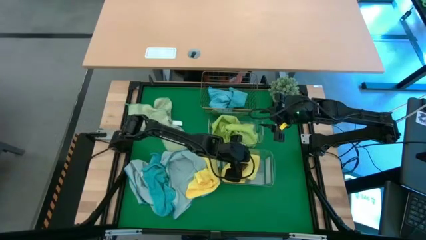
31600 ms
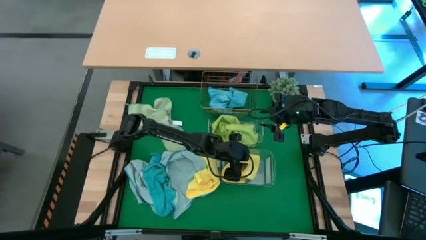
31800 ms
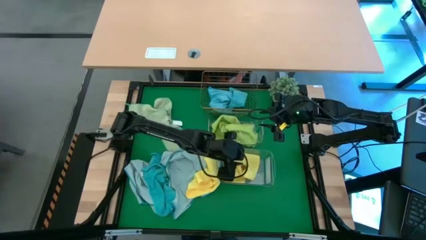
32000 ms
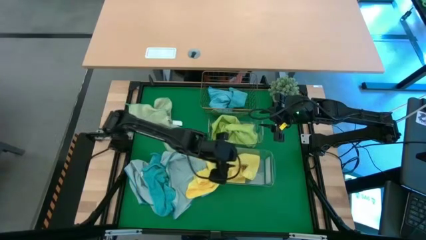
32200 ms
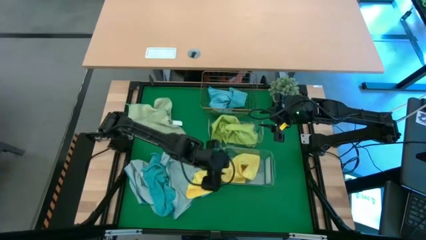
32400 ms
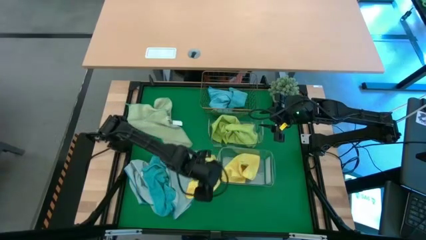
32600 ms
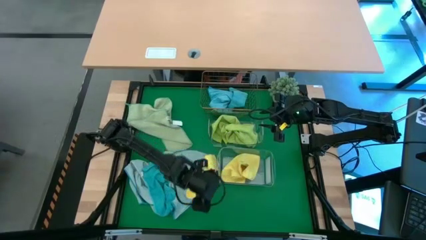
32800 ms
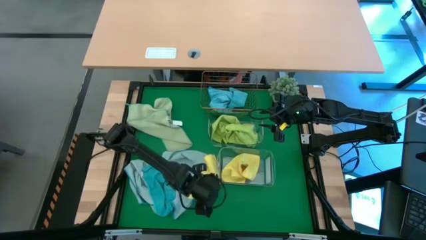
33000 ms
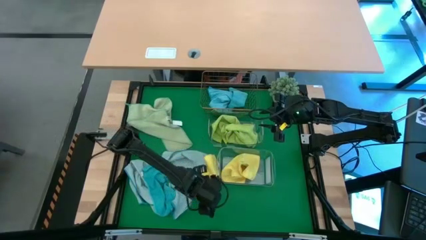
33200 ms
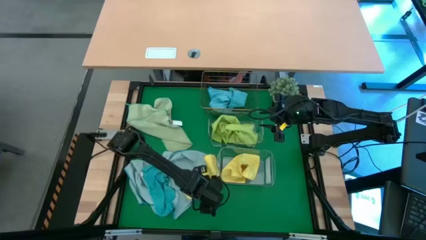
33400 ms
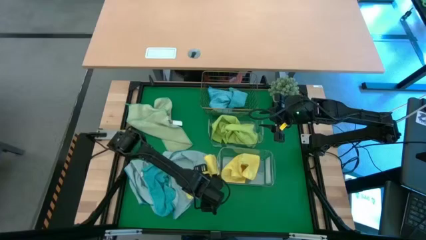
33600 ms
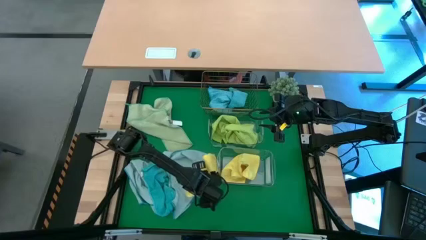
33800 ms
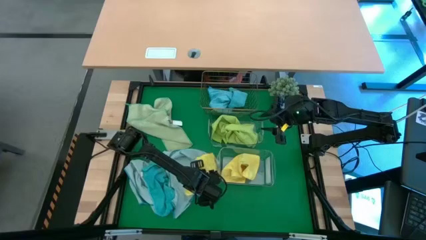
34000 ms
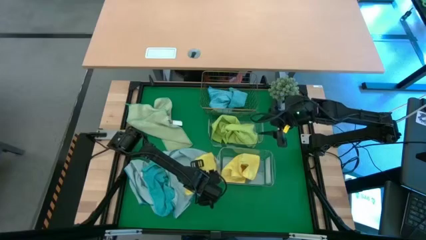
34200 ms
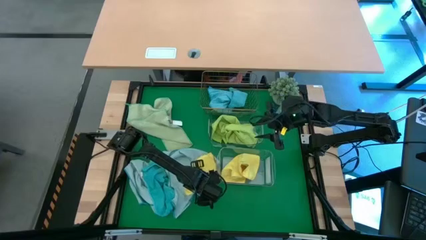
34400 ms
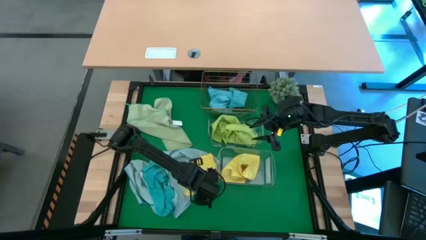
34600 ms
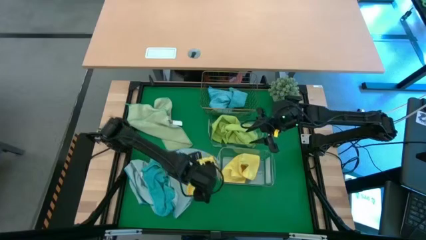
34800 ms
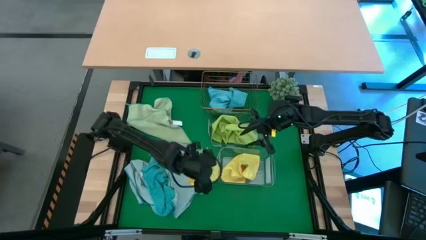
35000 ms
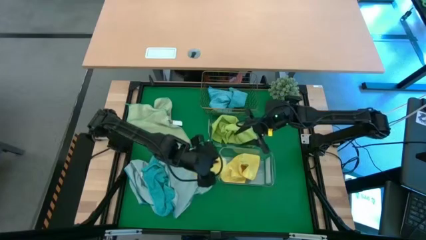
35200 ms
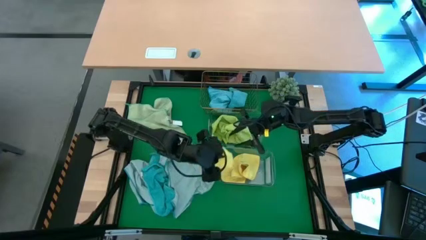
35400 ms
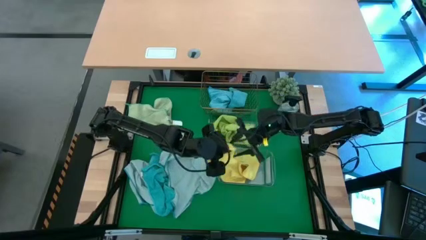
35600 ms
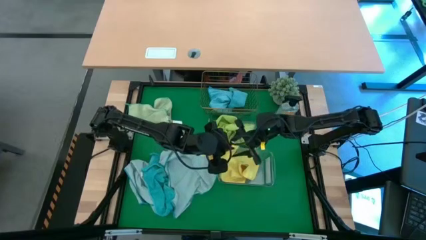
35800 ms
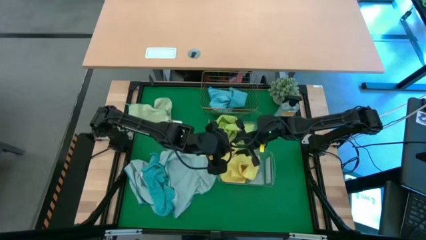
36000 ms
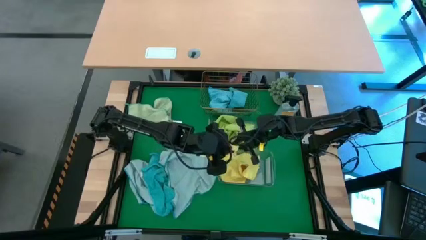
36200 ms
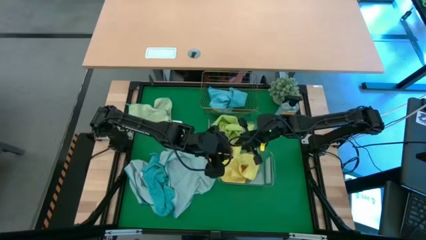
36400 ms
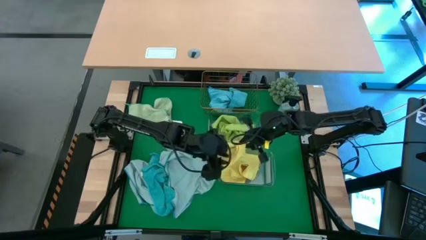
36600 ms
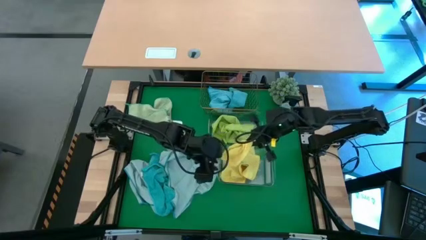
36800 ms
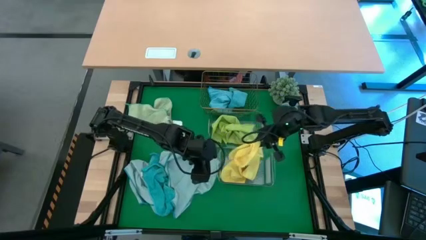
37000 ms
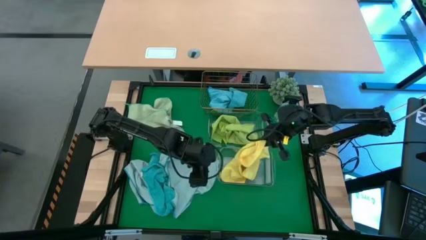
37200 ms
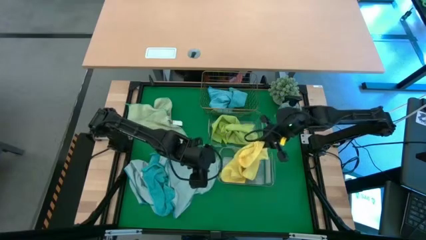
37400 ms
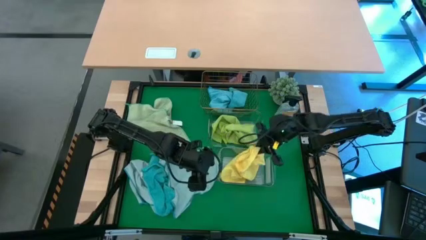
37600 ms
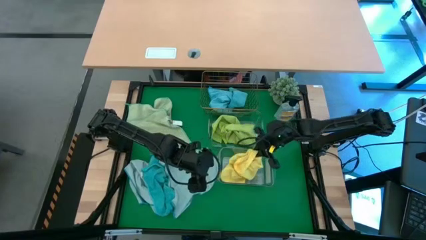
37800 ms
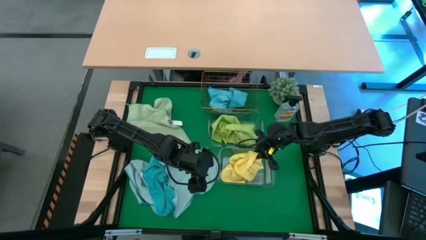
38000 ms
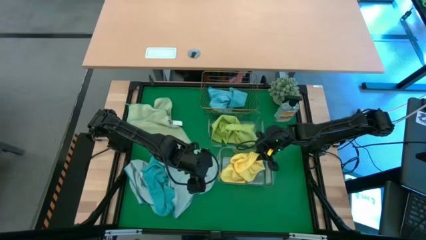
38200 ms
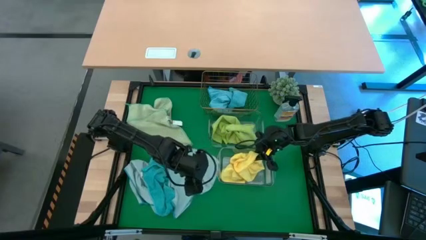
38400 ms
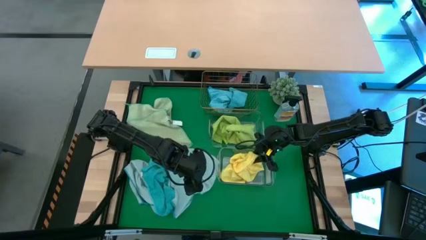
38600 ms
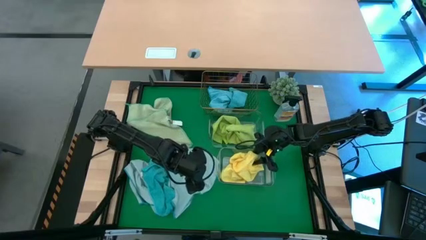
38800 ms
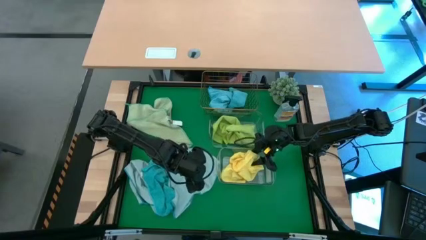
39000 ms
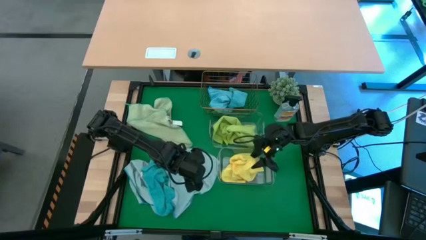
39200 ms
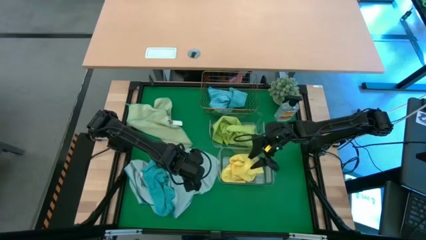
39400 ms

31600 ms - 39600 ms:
Task: Sort microfiber towel by color & place in baskets
Put the yellow microfiber towel into the bottom transparent bin

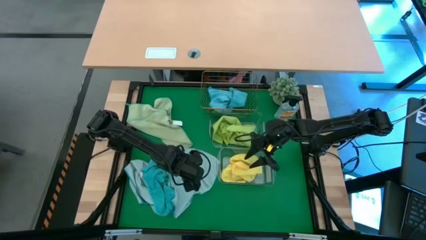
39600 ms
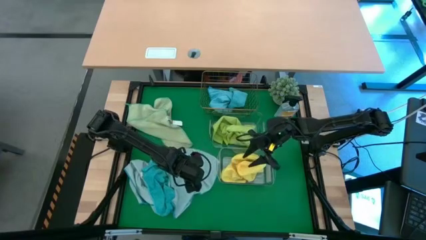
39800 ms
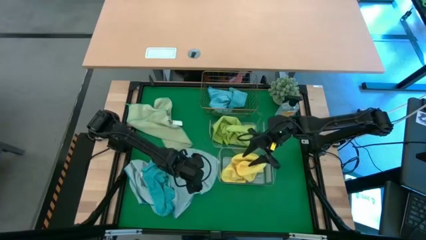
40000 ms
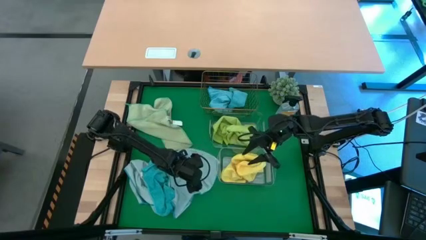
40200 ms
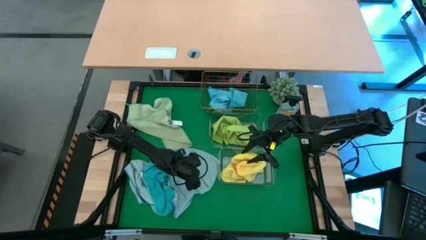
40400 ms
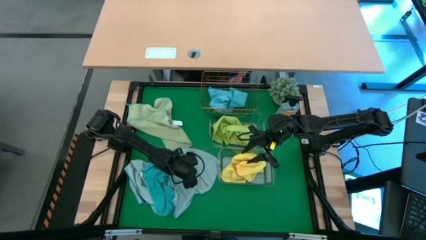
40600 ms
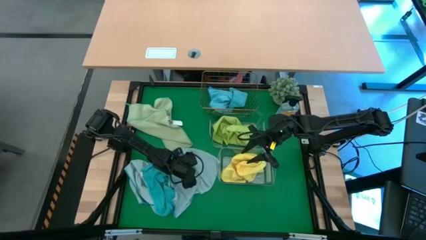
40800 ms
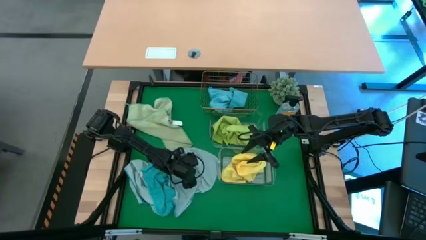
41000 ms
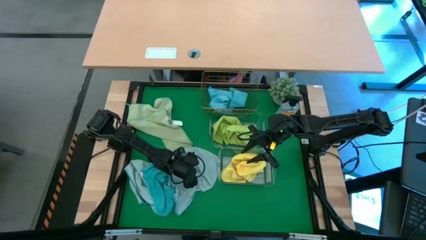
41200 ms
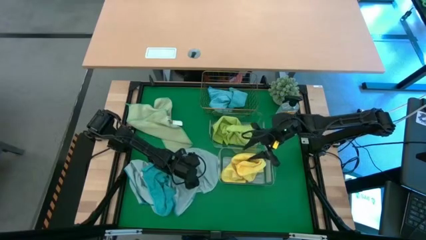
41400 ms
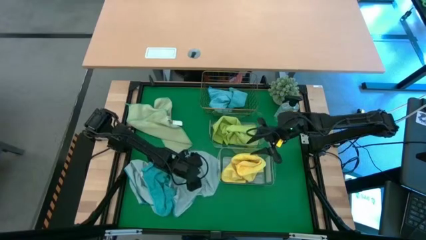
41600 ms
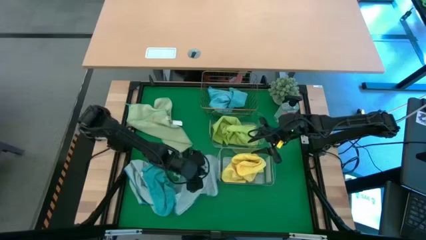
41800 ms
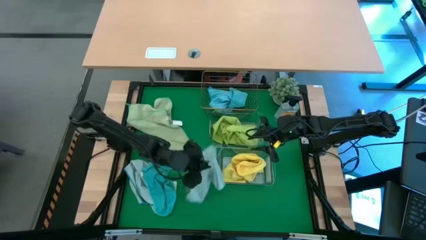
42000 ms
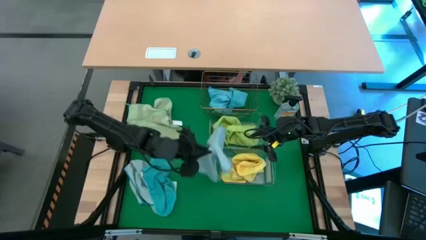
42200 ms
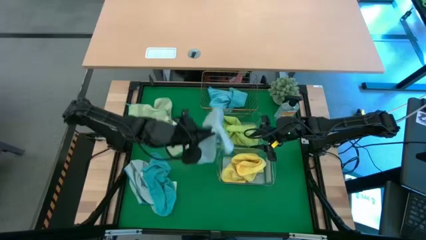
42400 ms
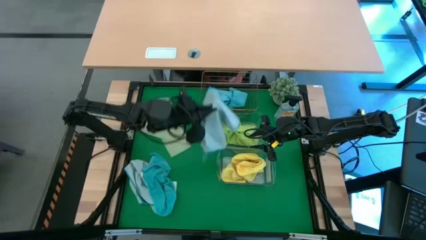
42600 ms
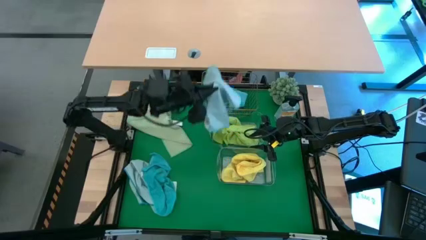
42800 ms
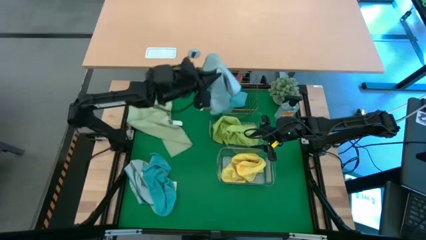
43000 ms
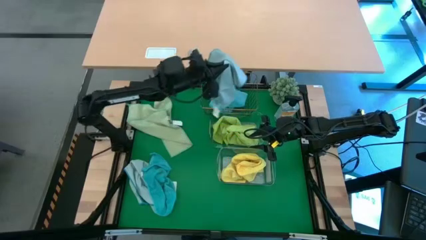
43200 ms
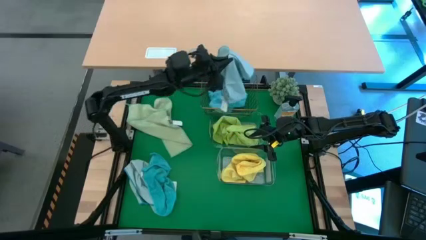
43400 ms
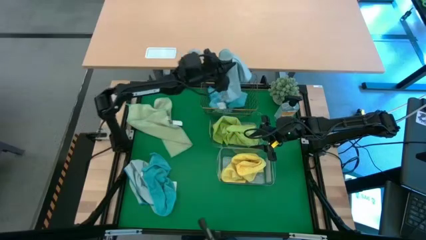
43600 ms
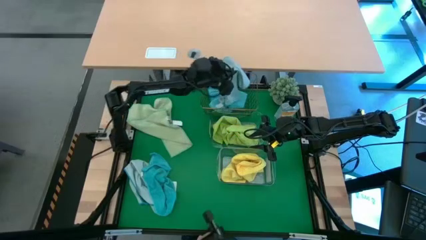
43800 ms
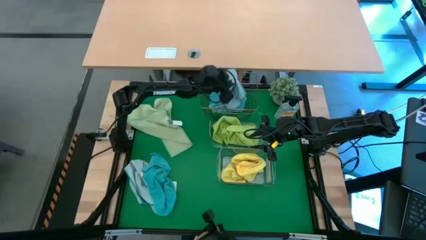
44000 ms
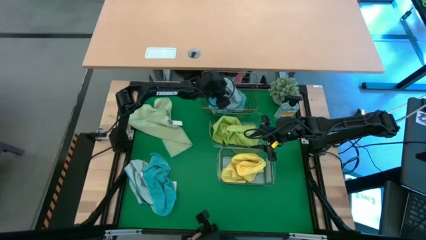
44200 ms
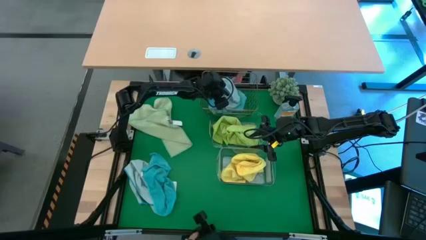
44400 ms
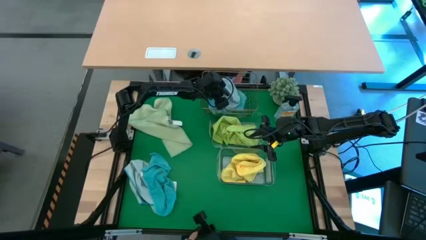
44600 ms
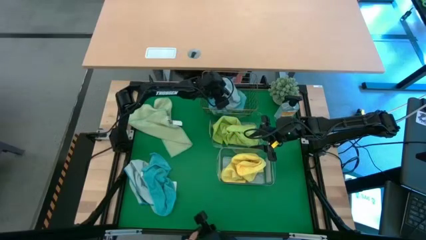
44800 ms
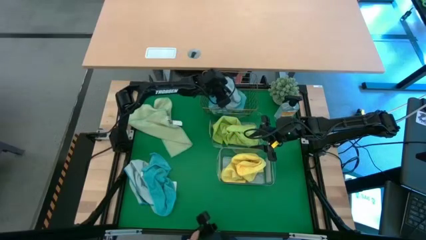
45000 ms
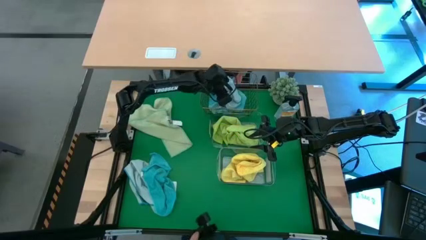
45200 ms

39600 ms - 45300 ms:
Put the light blue microfiber towel into the wire basket

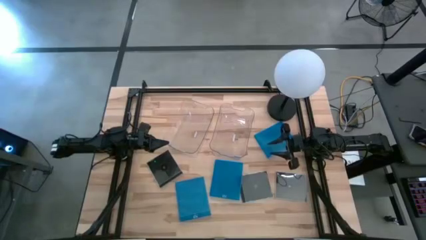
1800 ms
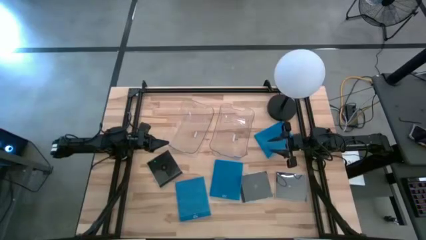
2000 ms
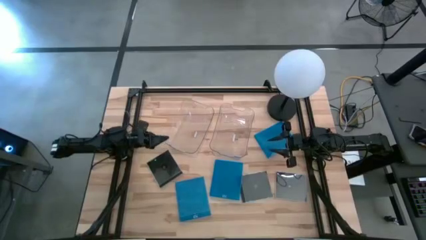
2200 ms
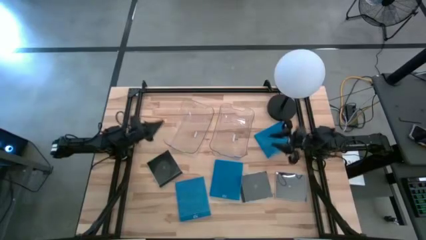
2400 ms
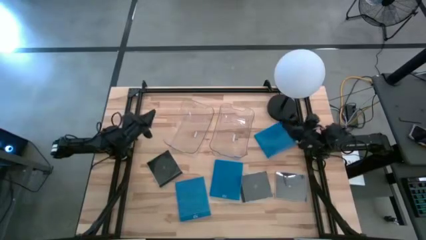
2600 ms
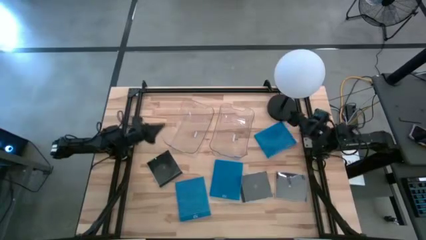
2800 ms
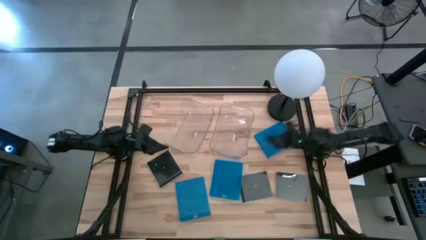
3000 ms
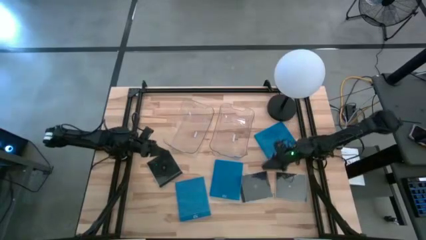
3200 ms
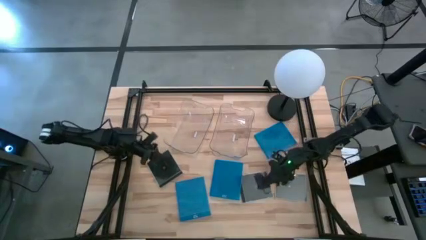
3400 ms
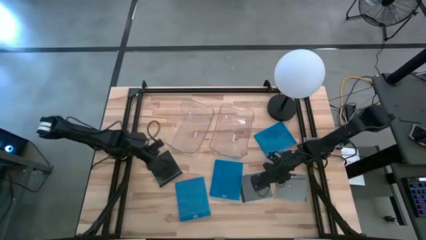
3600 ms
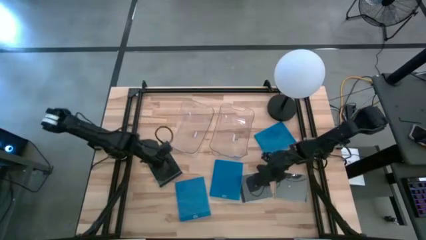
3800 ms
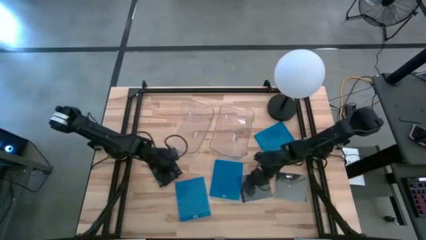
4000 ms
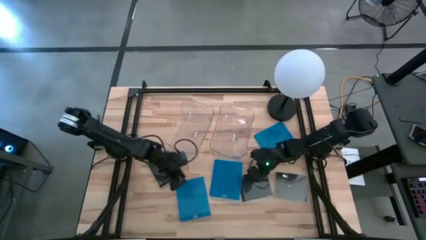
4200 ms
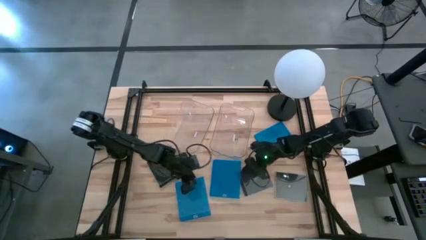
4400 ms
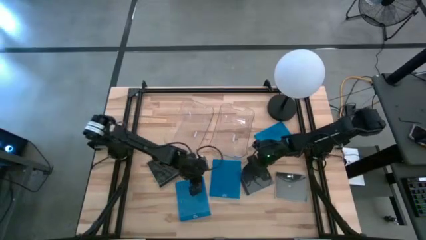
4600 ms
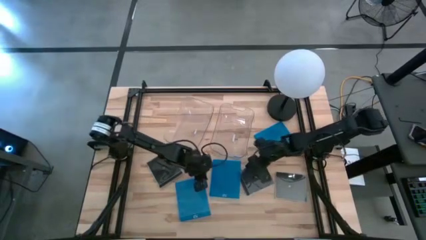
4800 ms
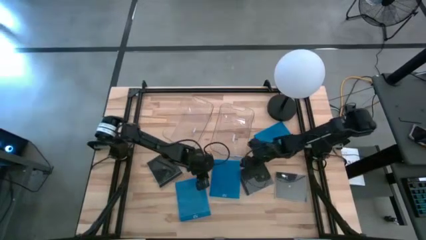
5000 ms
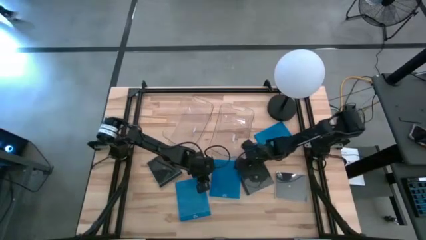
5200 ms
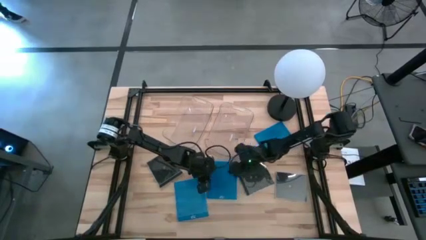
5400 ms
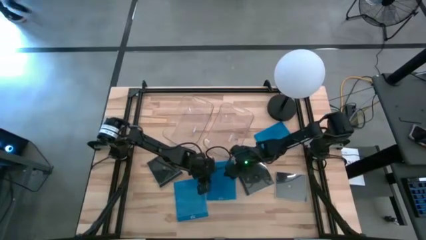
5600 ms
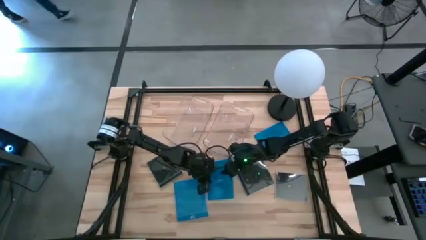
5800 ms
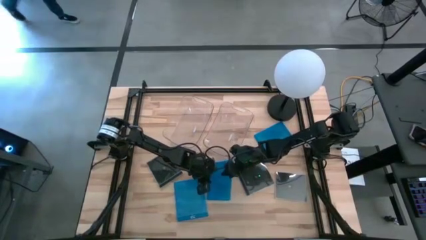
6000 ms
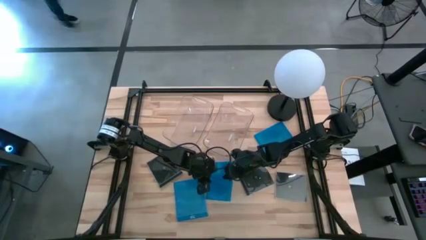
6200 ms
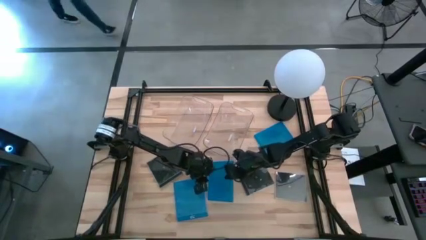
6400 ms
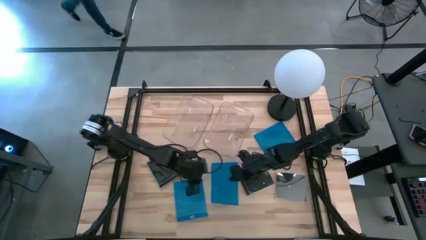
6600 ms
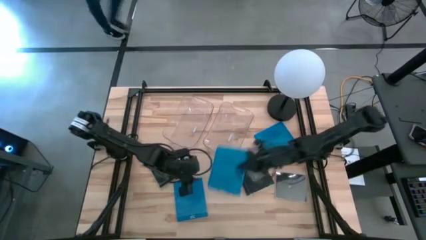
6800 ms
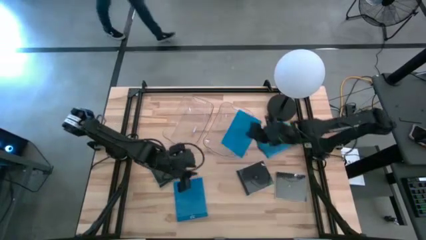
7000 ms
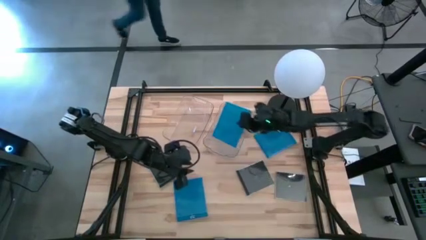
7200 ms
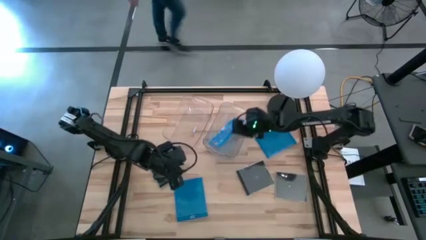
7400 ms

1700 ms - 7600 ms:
Task: Pick & place jewel cases by type
Put the middle blue blu tray case into the right transparent bin
